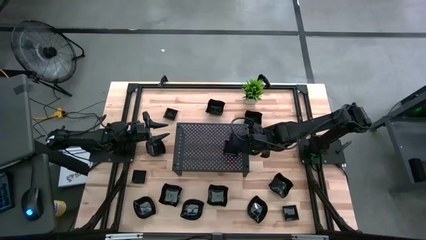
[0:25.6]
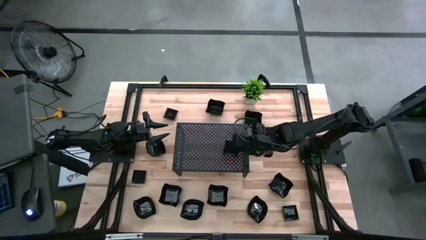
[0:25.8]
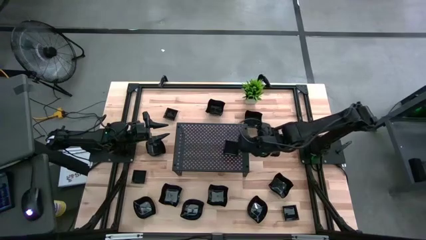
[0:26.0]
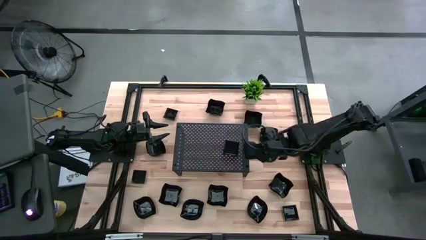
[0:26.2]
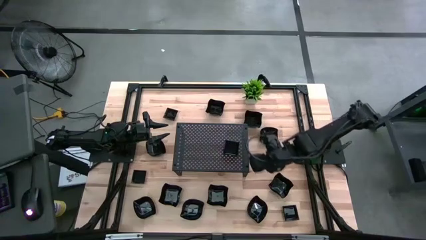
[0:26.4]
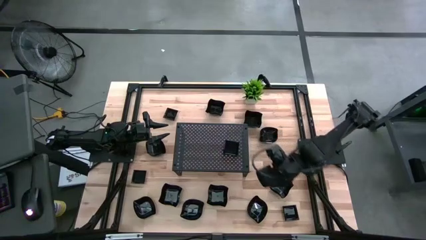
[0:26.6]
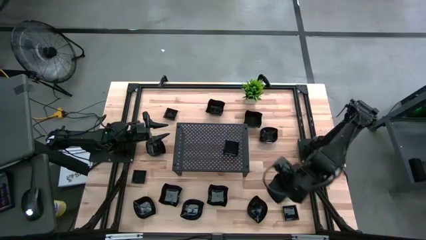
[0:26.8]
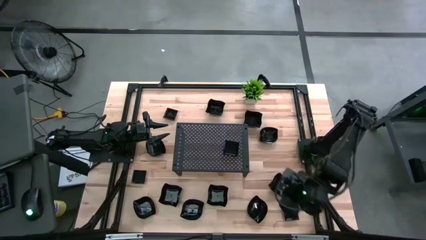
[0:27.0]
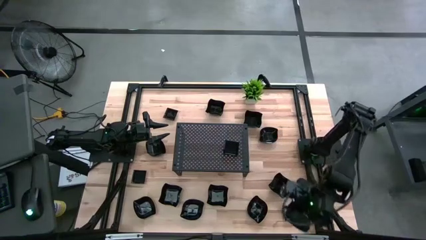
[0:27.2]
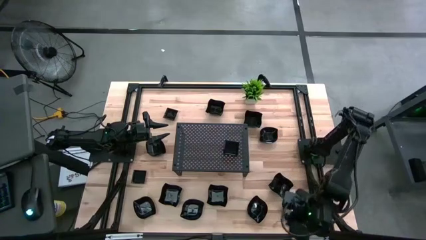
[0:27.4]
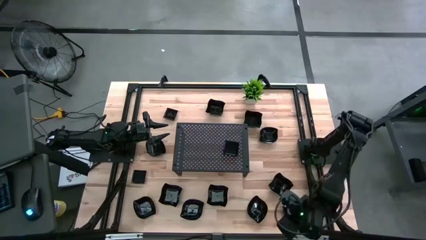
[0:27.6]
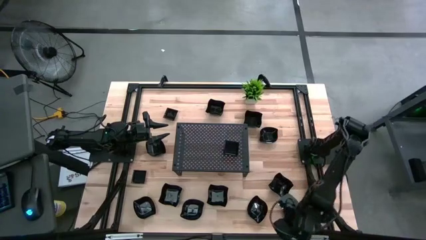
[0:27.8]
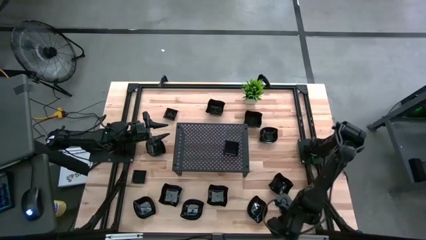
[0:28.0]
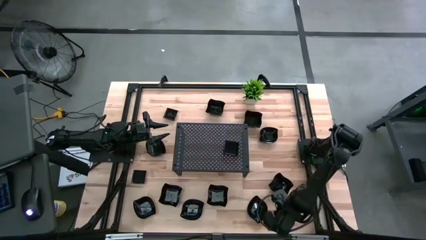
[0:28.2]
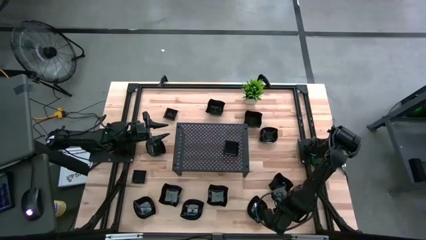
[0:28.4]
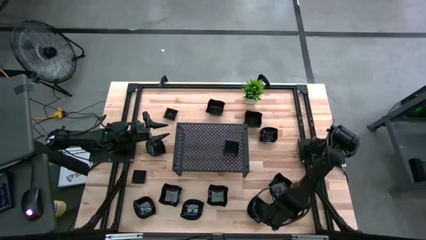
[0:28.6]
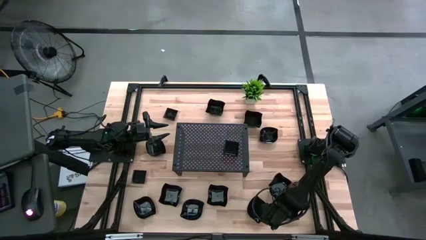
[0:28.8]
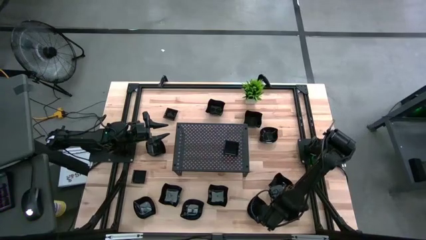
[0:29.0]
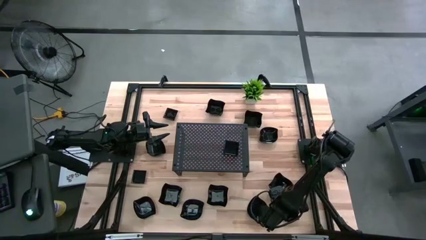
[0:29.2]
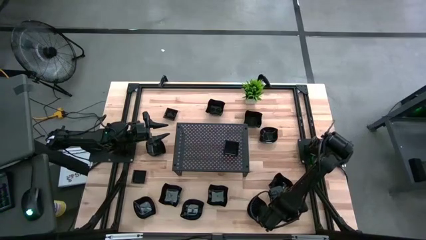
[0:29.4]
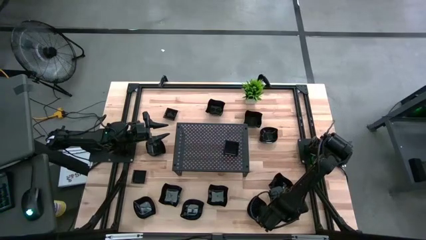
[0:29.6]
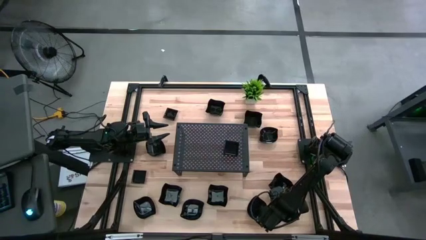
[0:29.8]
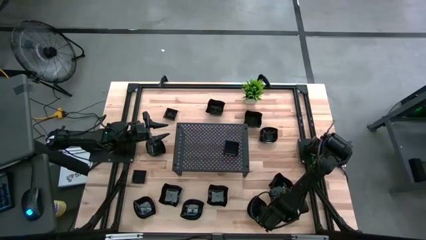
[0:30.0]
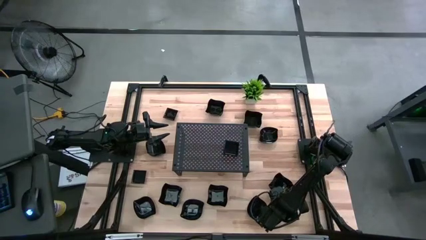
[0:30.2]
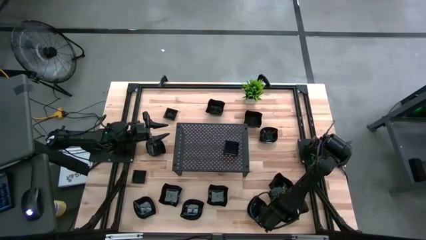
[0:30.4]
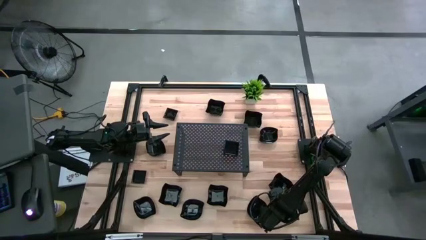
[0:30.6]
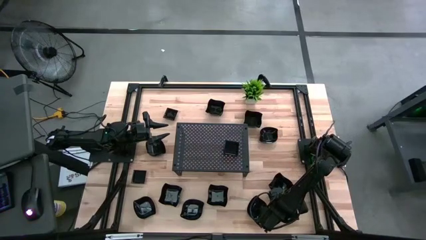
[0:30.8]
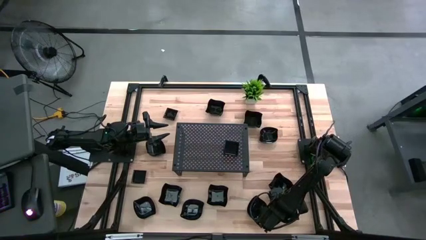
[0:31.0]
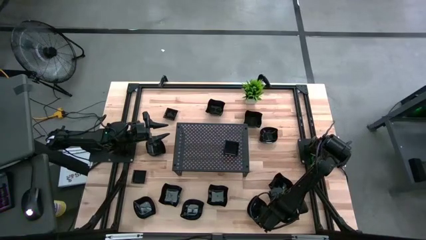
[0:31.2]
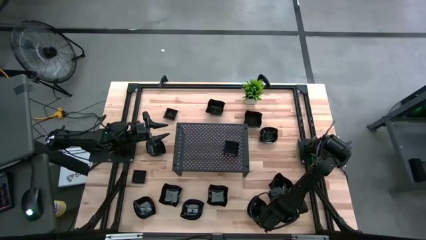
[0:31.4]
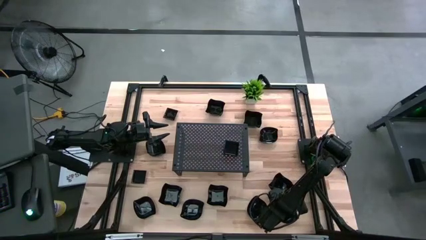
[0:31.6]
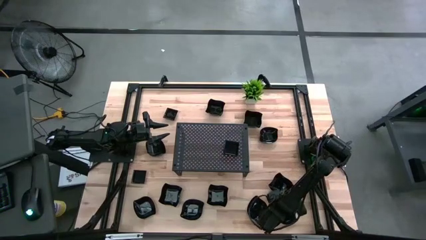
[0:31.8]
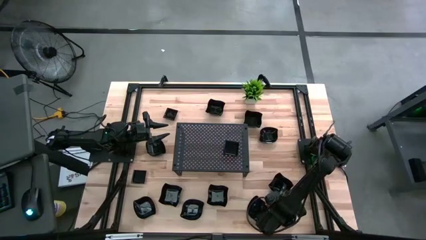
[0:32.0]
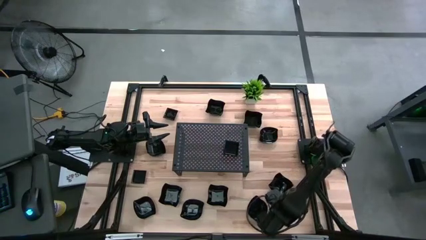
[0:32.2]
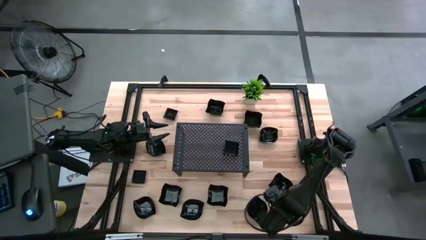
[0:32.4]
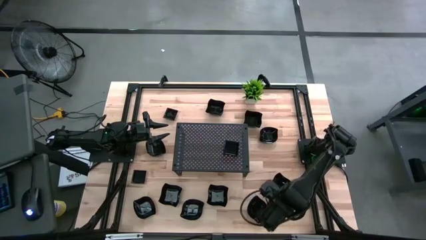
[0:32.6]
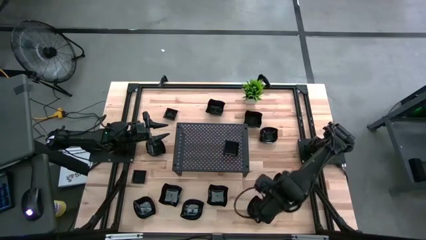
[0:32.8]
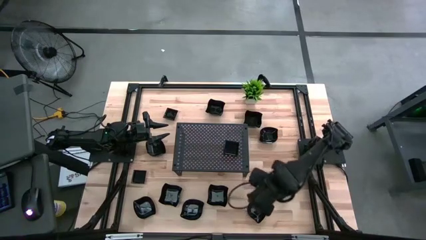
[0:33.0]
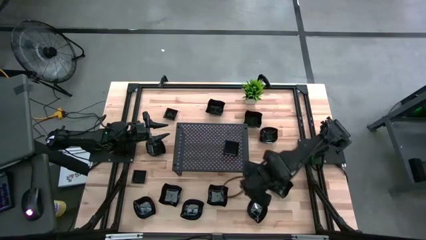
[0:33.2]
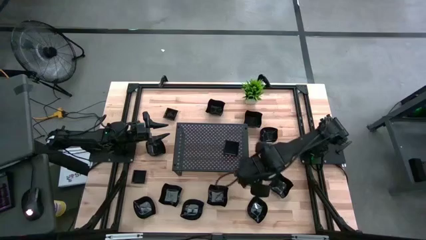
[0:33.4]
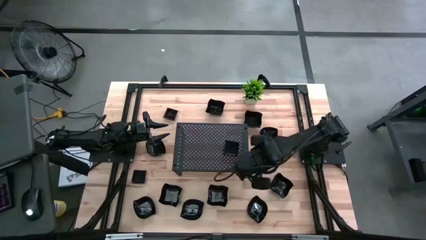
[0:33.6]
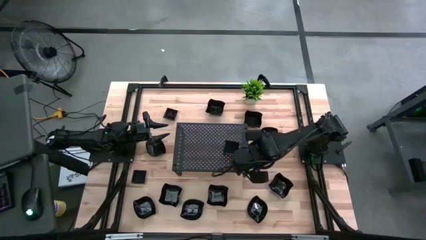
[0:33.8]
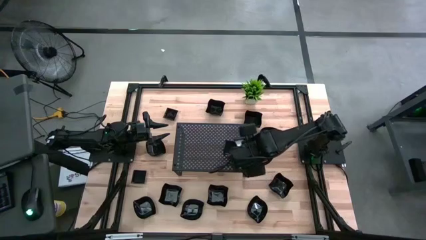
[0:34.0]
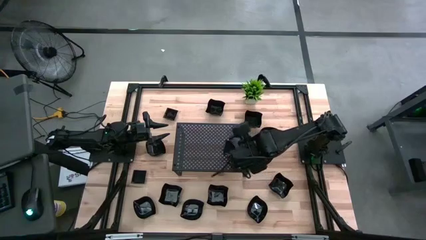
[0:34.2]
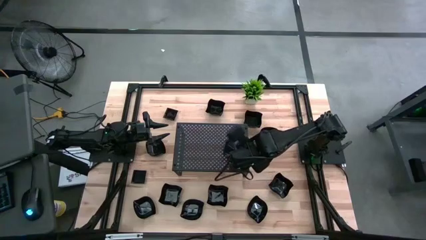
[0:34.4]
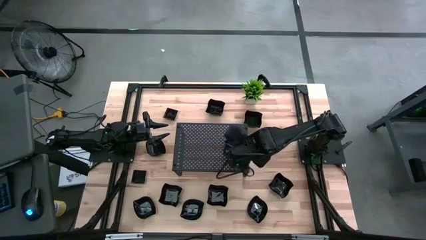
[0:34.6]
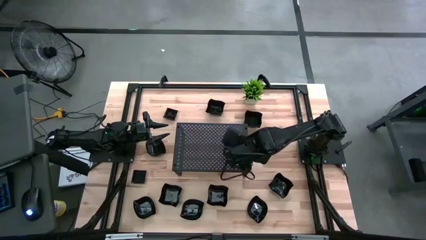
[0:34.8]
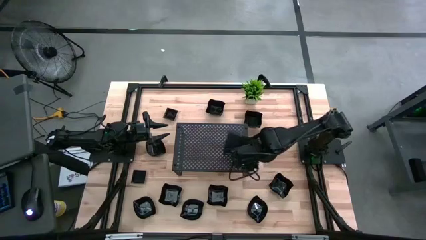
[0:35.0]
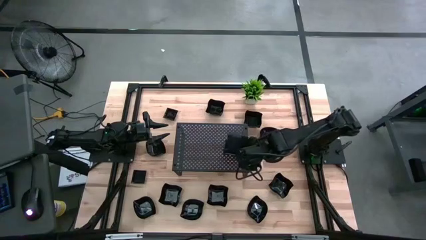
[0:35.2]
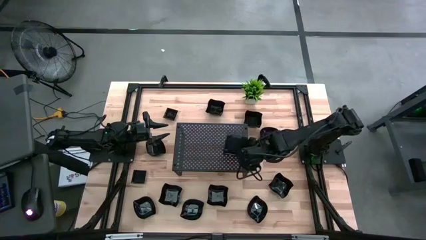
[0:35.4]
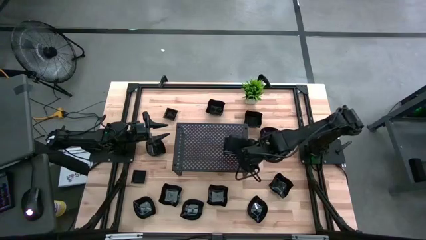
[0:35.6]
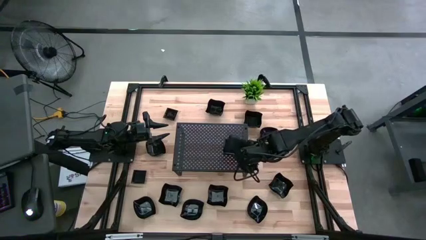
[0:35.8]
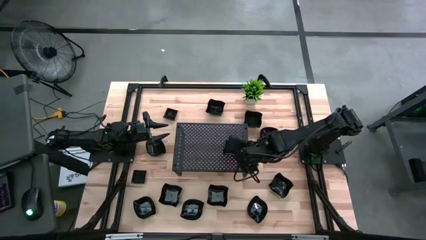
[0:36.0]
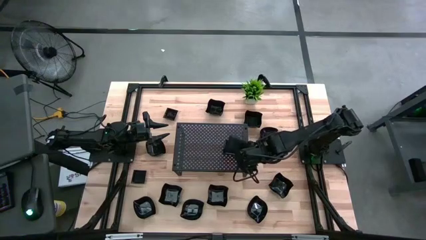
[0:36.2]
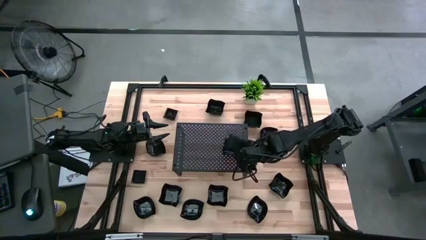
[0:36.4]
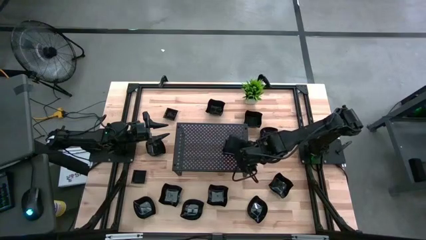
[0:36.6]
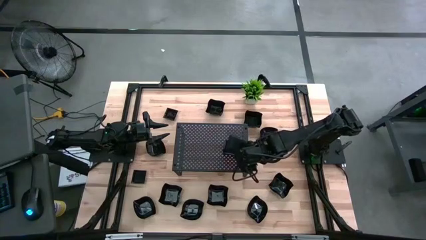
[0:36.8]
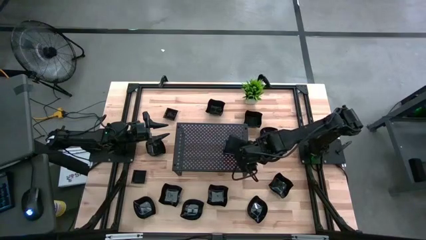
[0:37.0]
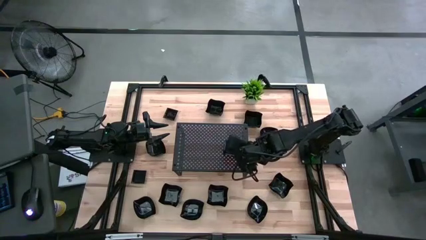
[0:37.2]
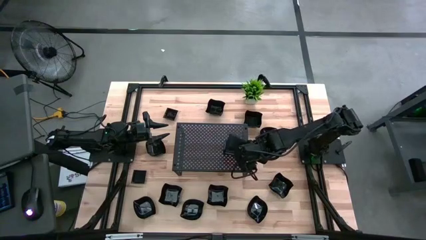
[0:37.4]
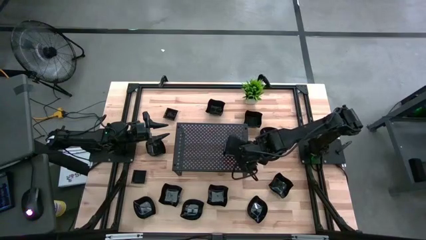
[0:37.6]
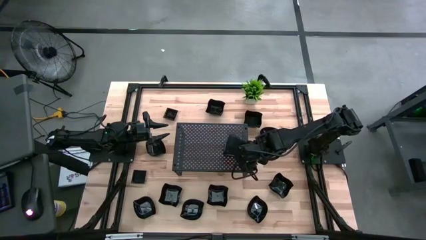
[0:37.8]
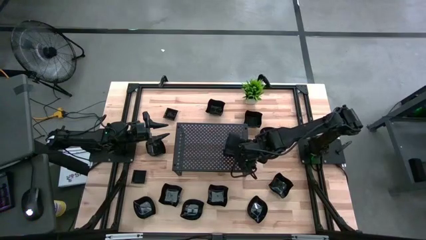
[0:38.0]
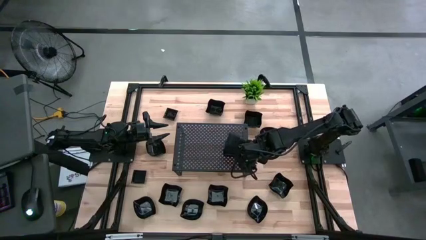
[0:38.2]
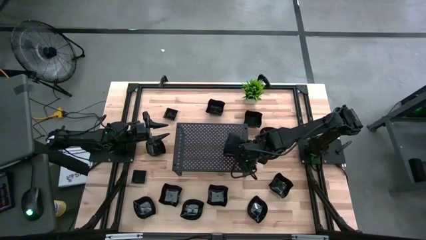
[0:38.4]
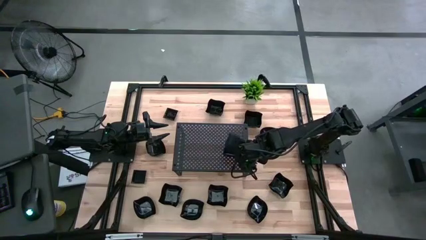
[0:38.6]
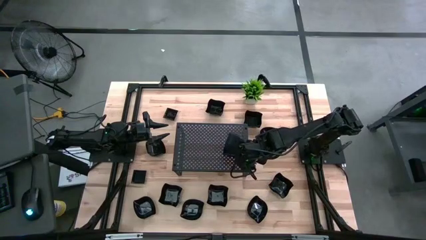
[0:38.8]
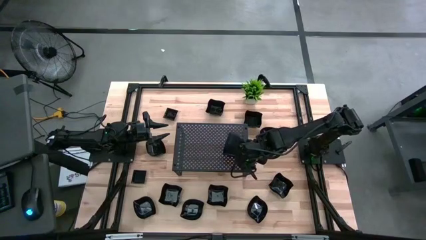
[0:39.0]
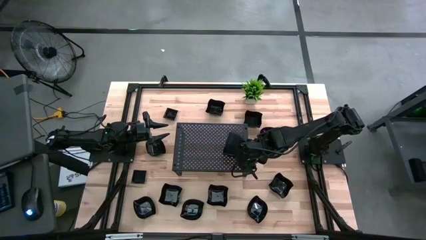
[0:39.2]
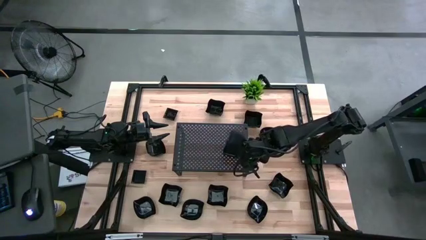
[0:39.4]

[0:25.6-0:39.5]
Task: Pick & Place Mini shaped plates
Stack the left square plate on top of the square plates on the shelf
